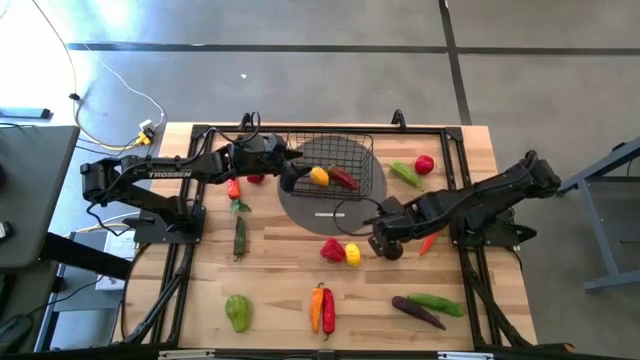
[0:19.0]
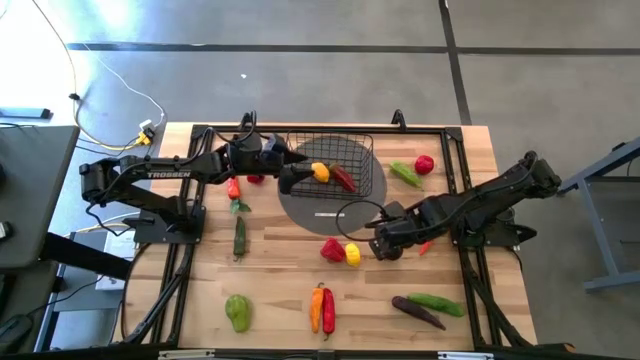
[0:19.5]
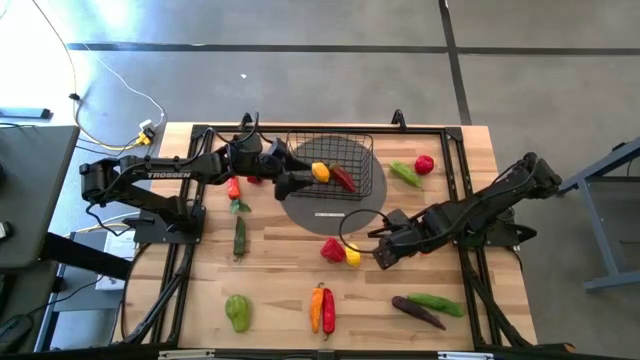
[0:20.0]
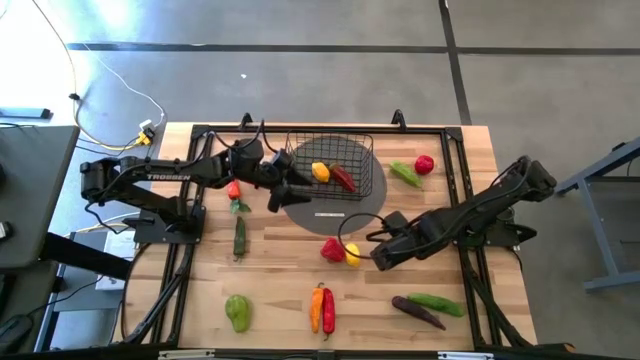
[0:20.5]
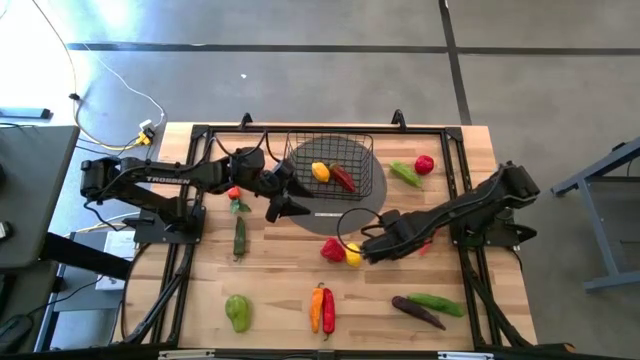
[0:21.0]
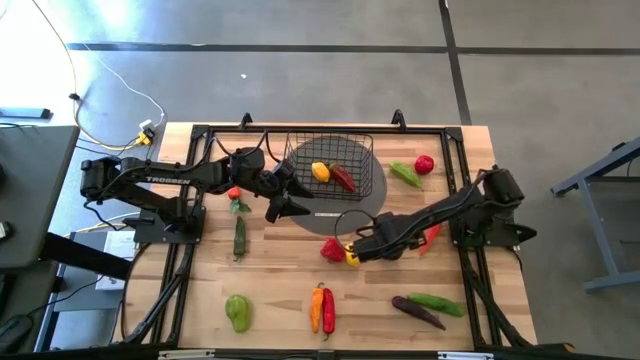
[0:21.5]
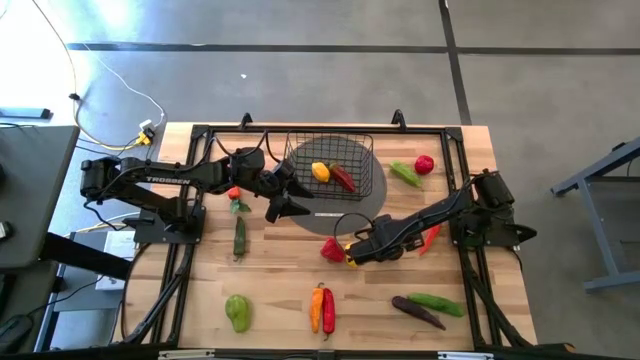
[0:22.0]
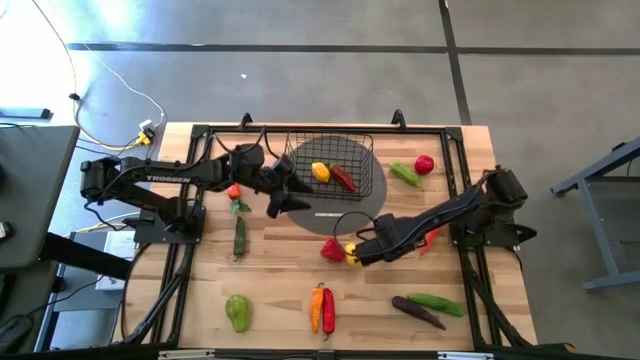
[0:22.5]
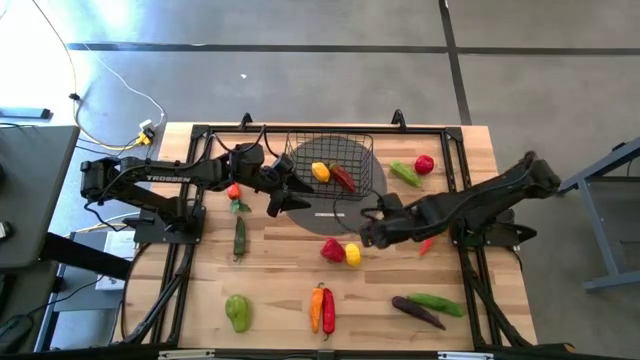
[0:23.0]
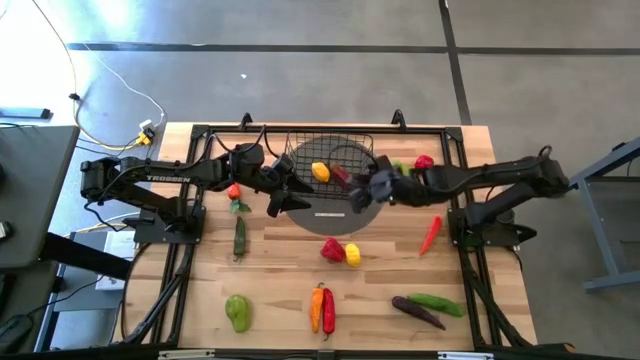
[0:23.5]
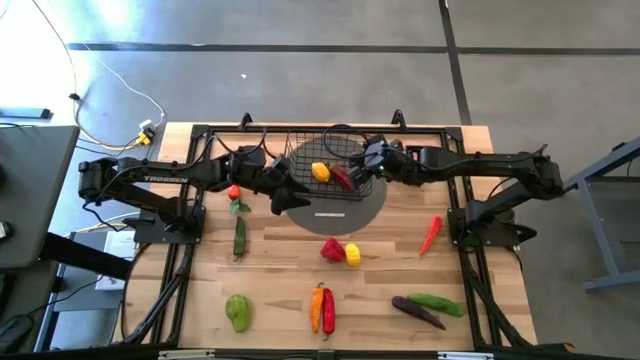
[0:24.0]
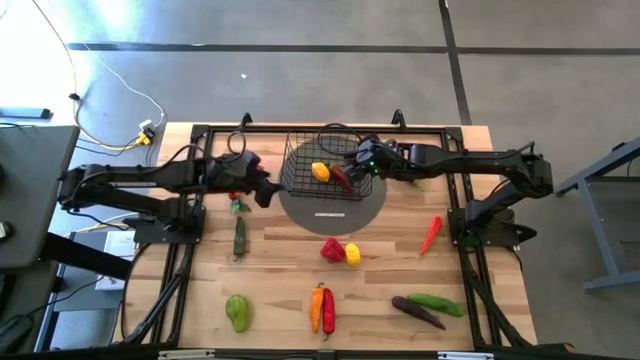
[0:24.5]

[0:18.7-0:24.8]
Task: Build produce basket
Put the onion into the wire basket

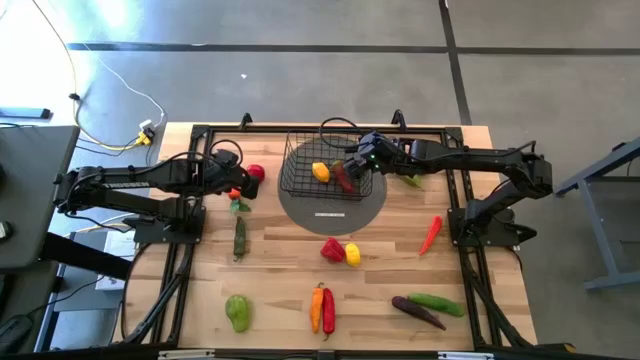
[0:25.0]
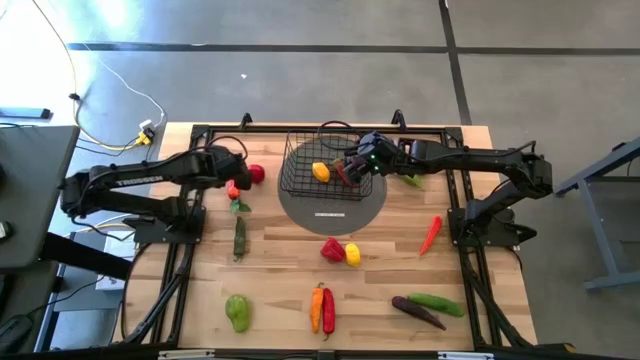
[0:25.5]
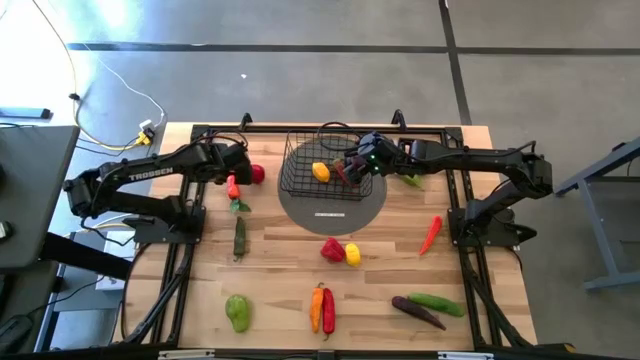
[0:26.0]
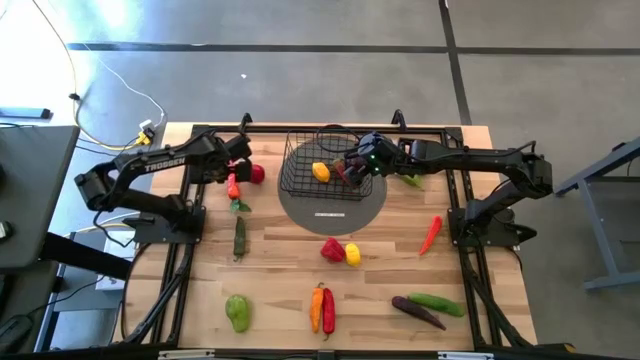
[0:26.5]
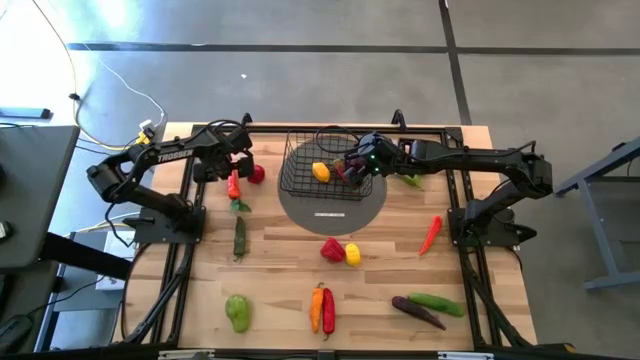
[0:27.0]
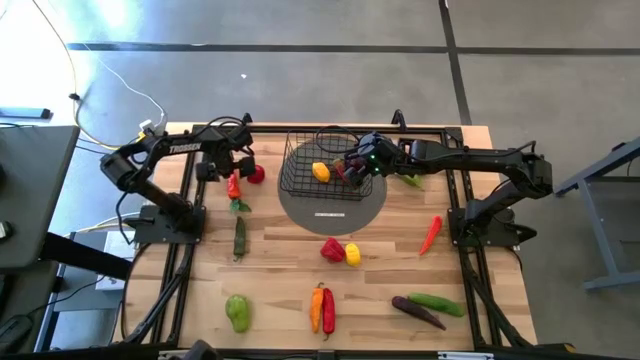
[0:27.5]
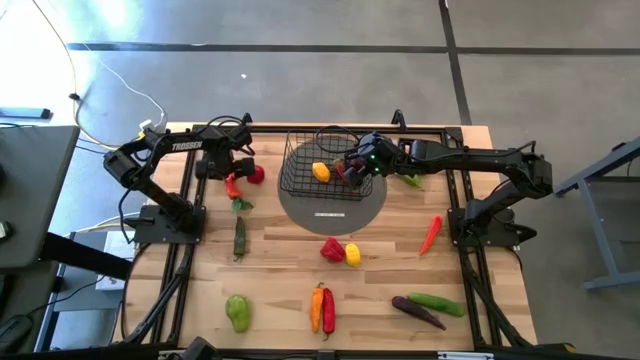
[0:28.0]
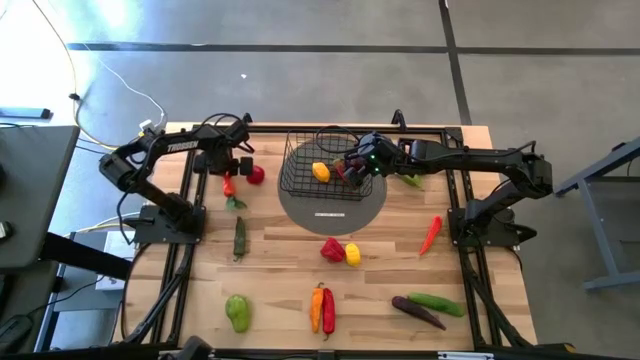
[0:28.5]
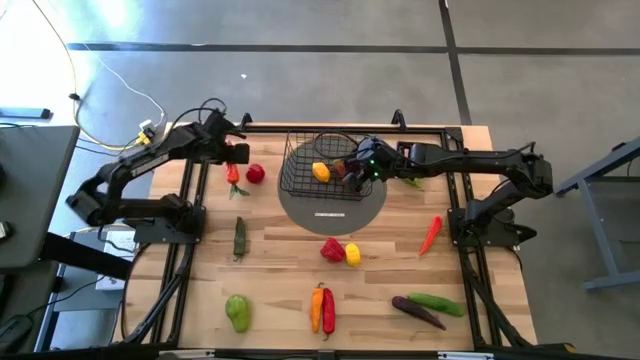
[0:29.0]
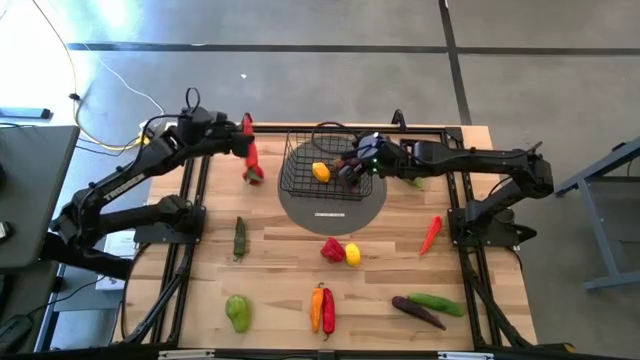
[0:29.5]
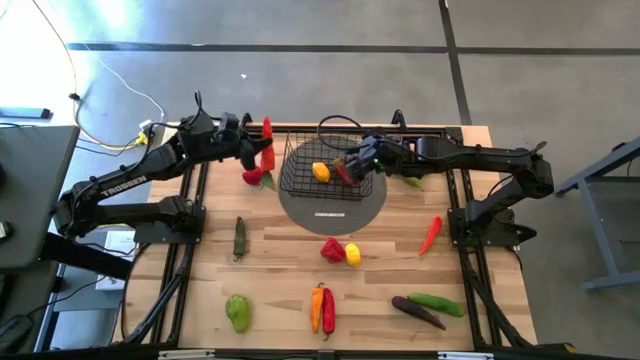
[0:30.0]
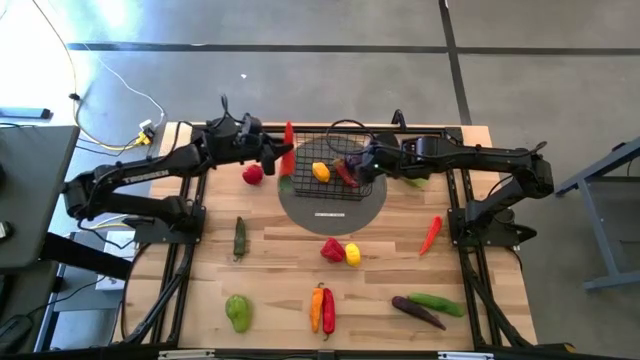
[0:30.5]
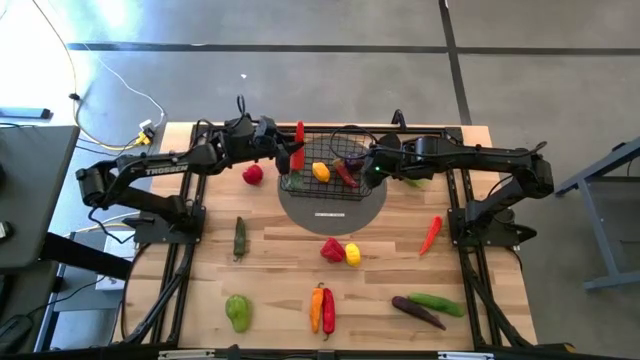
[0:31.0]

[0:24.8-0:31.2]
Put the top carrot into the wire basket

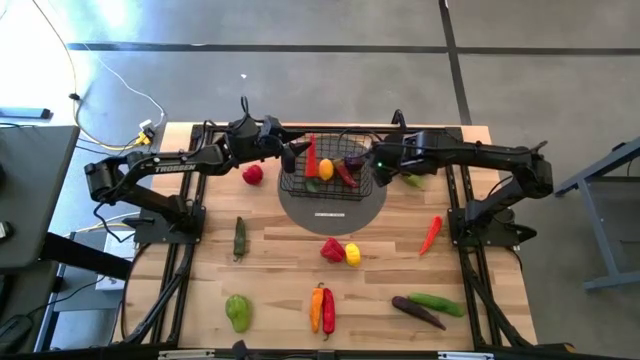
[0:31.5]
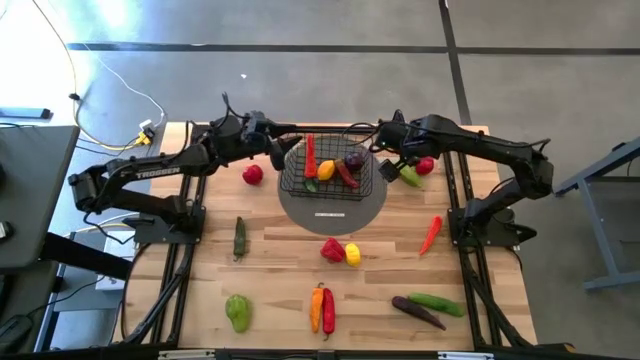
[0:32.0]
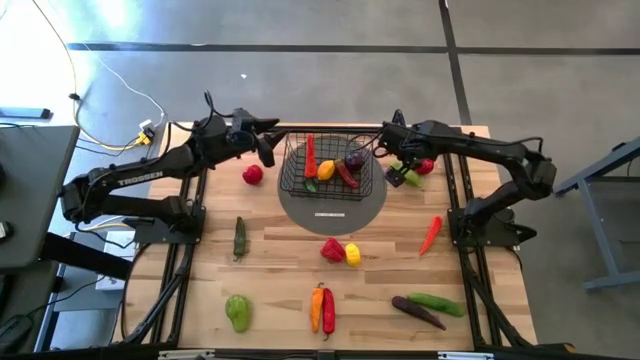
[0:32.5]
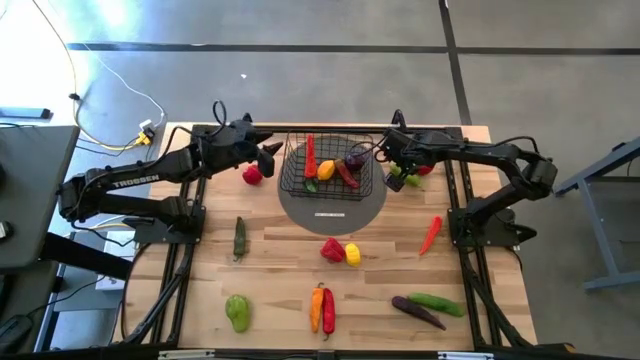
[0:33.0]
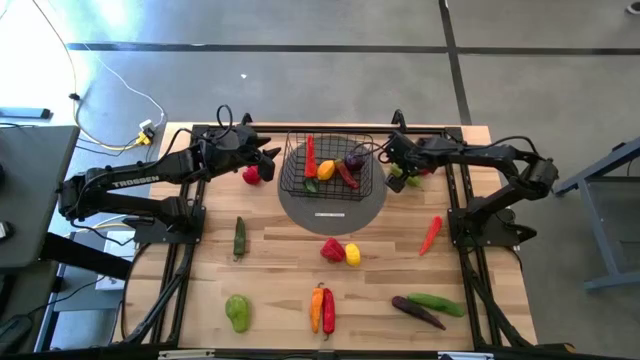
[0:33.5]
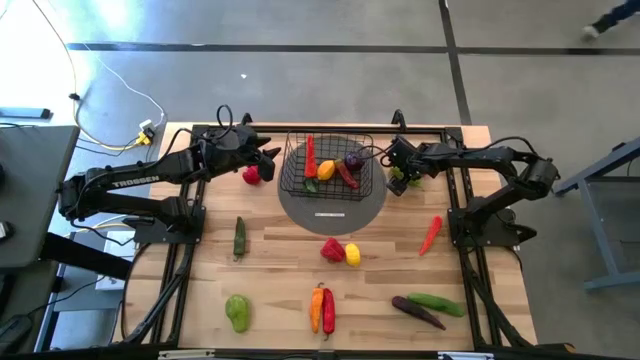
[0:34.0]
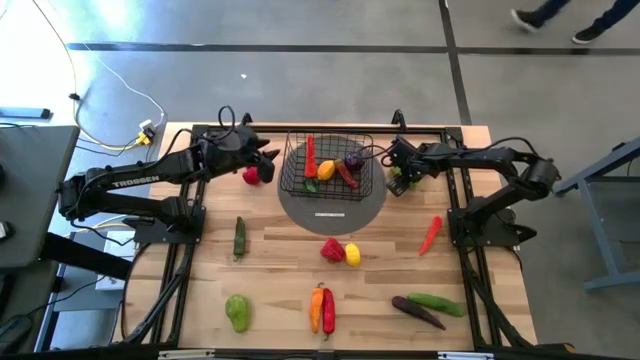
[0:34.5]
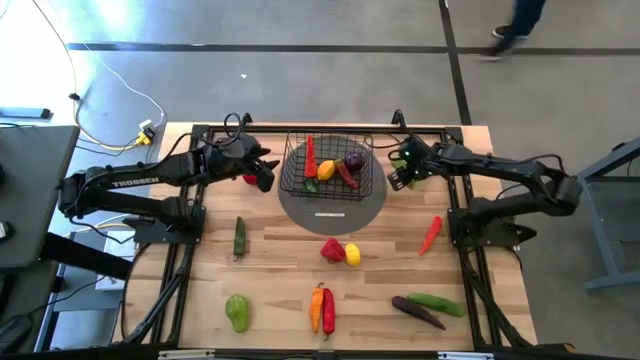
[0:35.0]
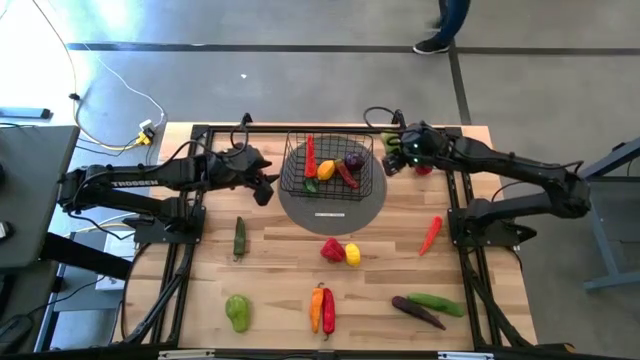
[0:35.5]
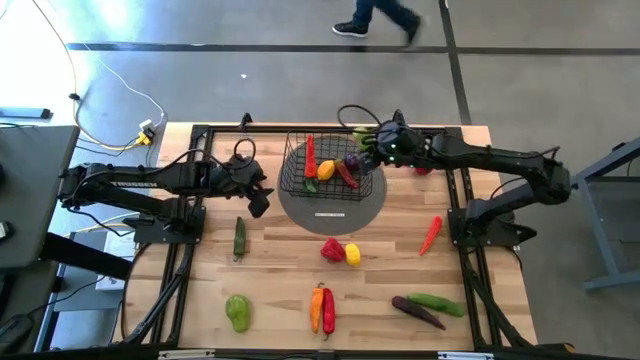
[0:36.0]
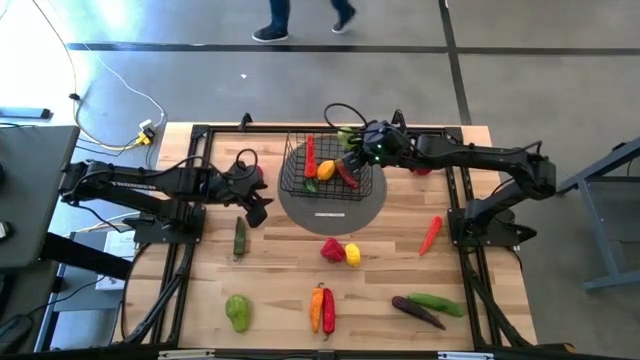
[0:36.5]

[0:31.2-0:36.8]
Put the top cucumber into the wire basket

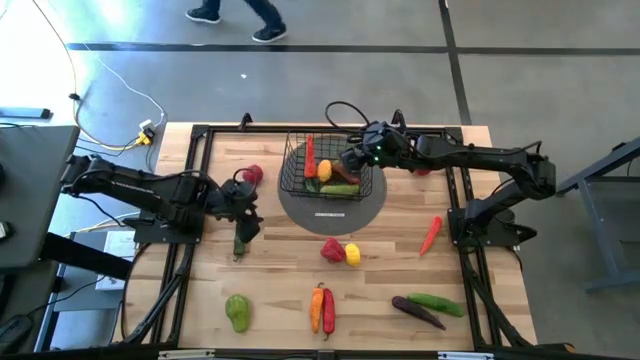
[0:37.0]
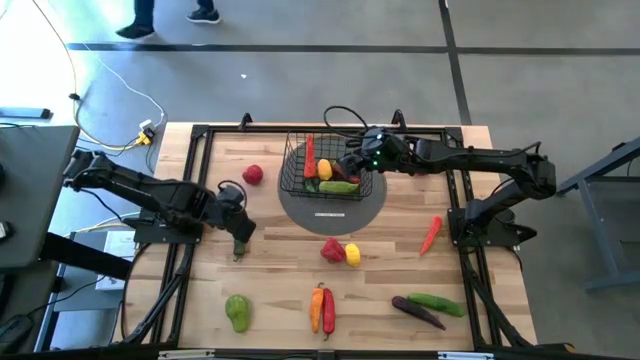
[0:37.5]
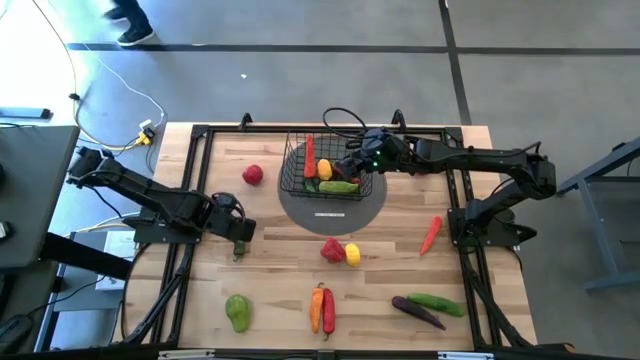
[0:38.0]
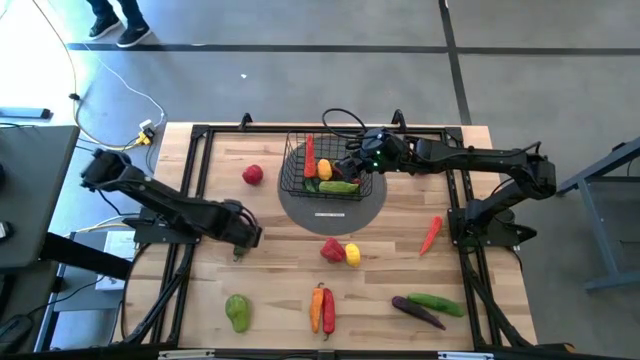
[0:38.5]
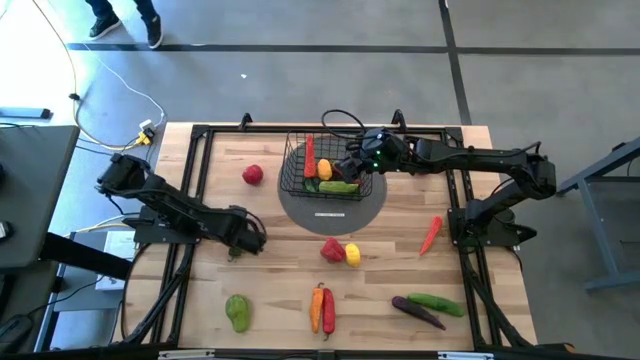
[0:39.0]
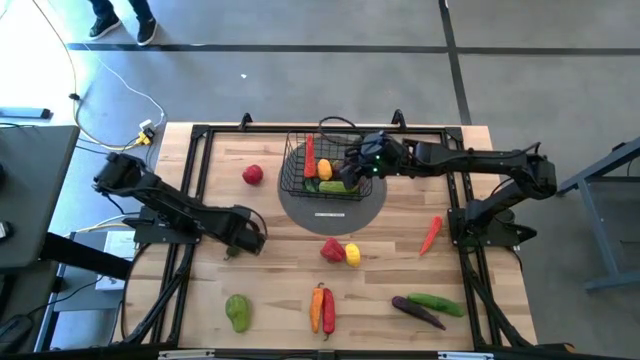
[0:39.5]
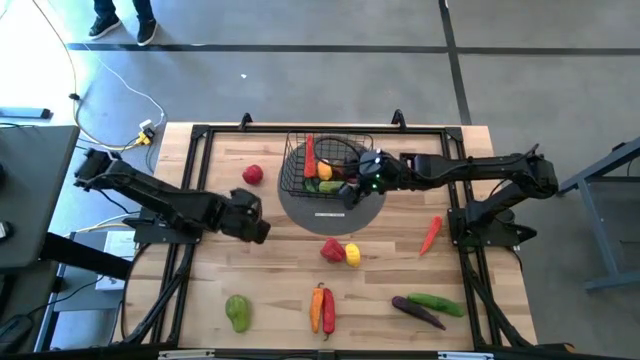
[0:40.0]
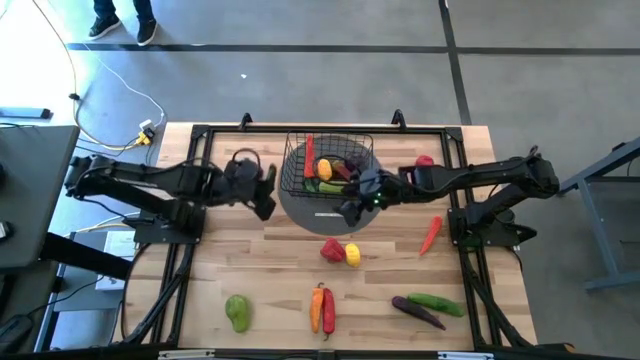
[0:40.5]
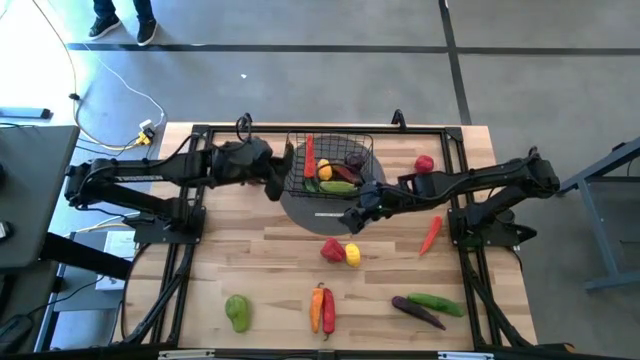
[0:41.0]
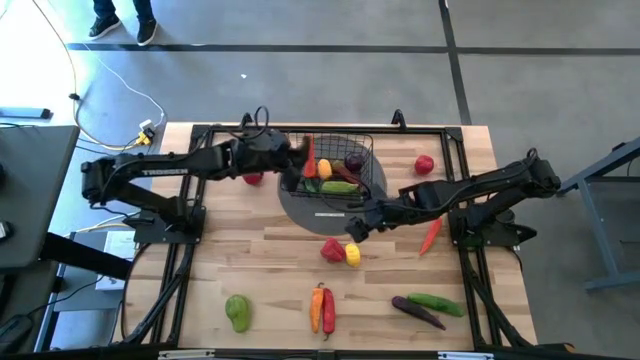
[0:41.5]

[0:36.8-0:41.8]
Put the dark green pepper into the wire basket
